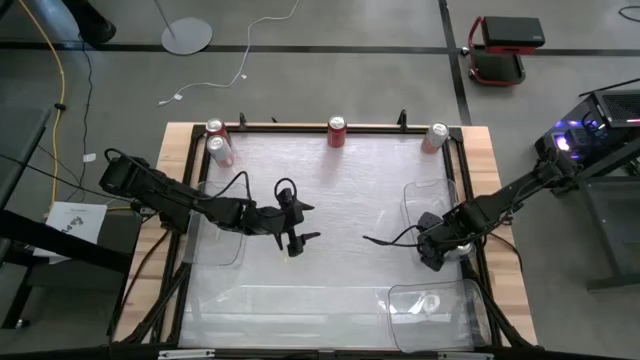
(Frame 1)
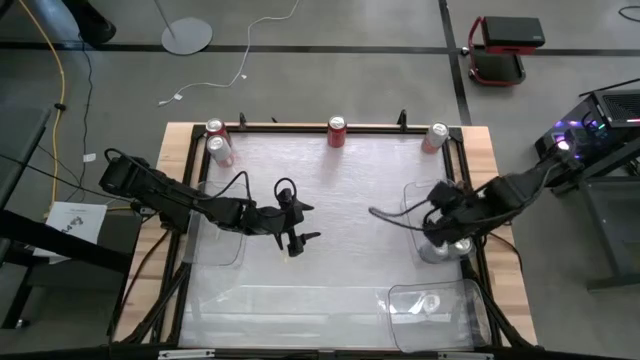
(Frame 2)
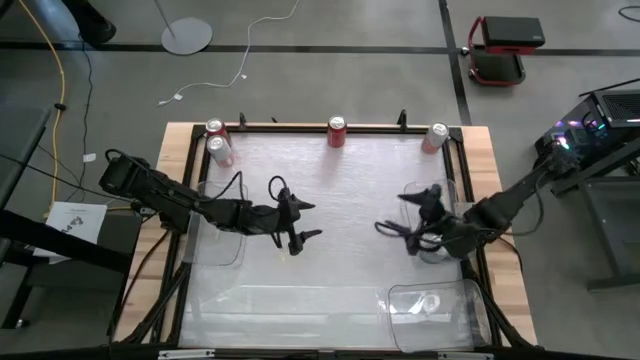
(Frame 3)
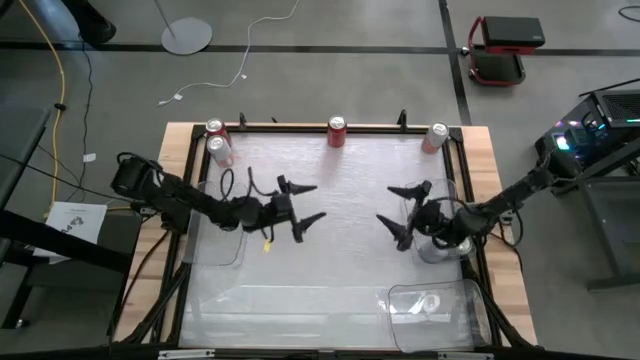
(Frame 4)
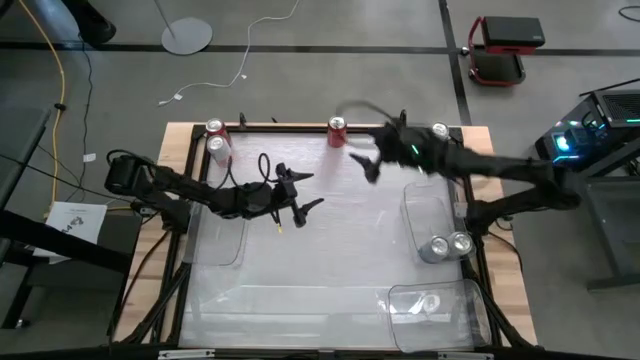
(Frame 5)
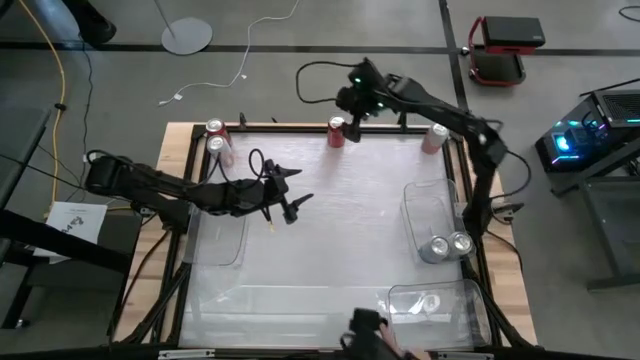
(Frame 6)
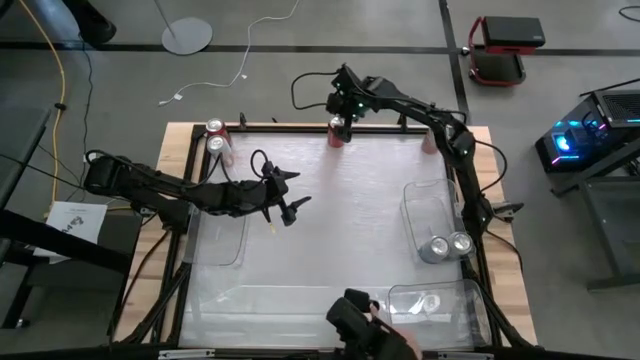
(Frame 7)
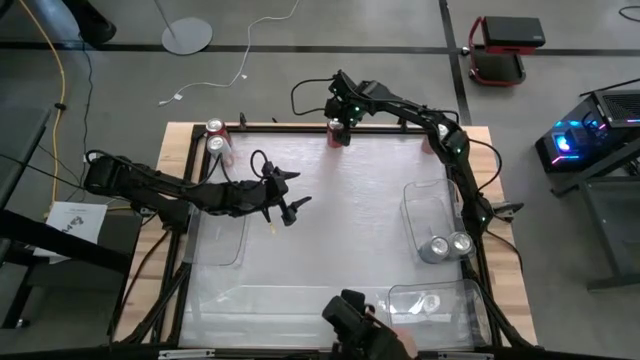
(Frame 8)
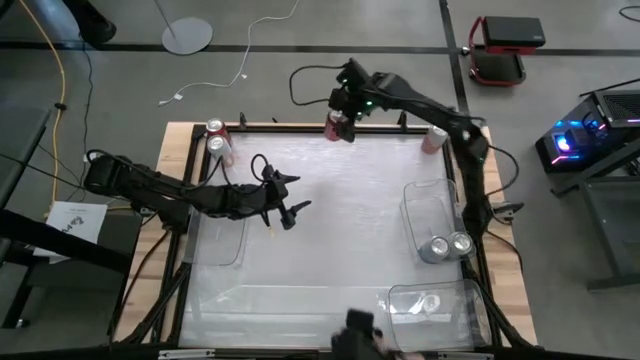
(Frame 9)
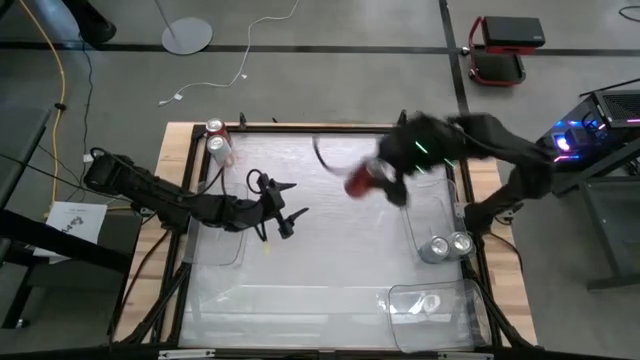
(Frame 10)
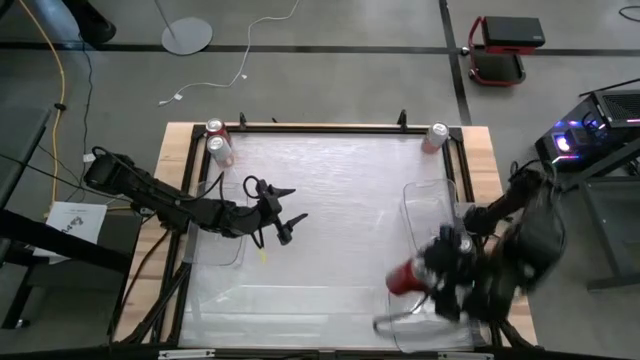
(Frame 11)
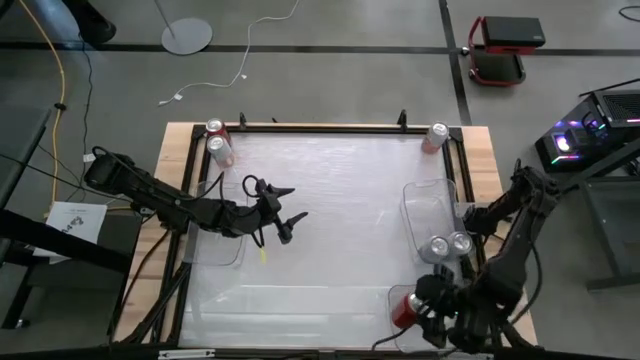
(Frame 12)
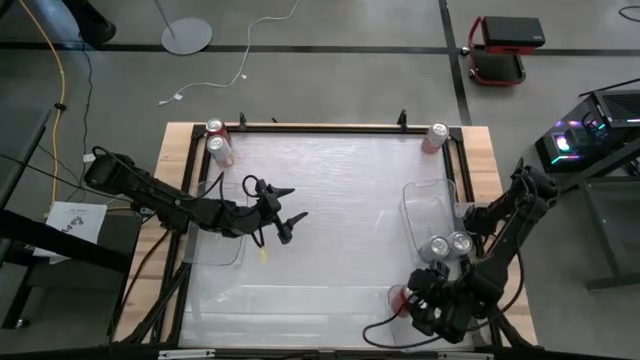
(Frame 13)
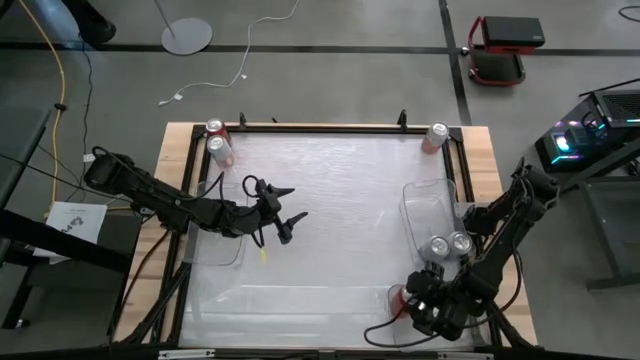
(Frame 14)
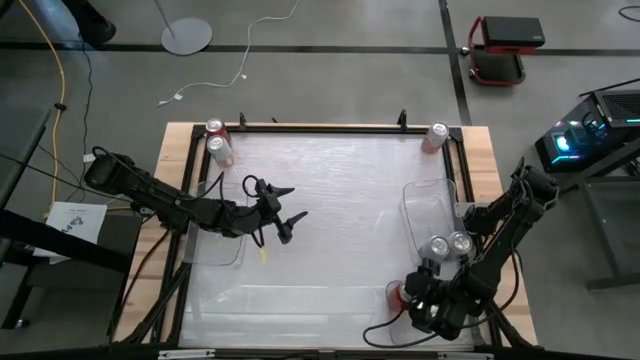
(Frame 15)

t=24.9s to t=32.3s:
Task: Sort soda cans
Put the right red-black soda can into the bottom transparent bin

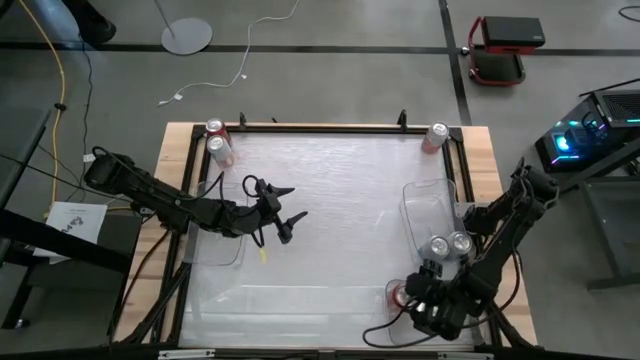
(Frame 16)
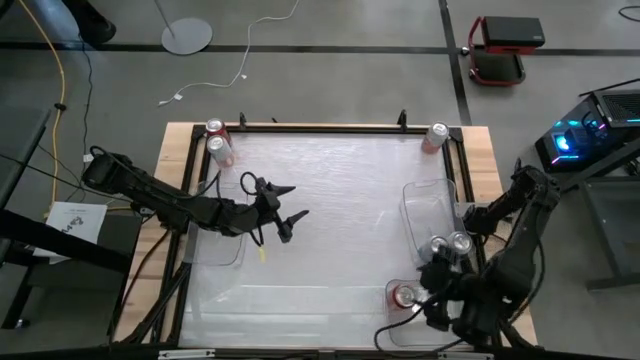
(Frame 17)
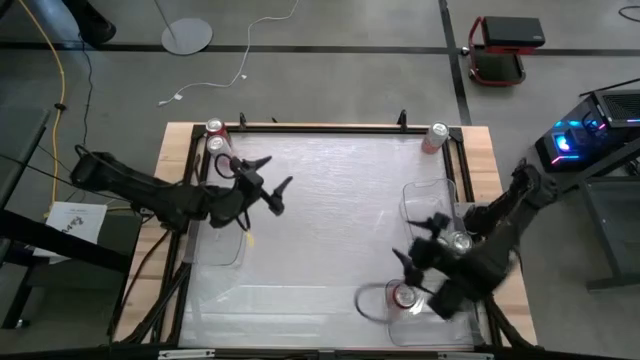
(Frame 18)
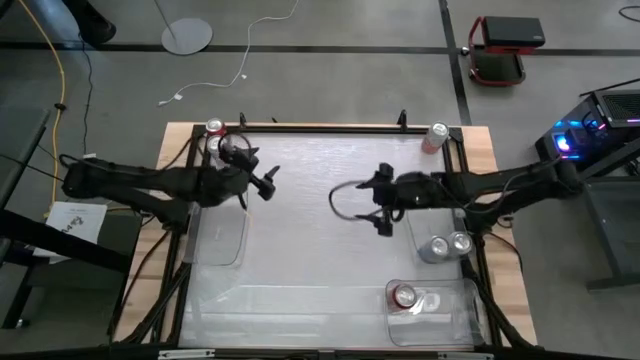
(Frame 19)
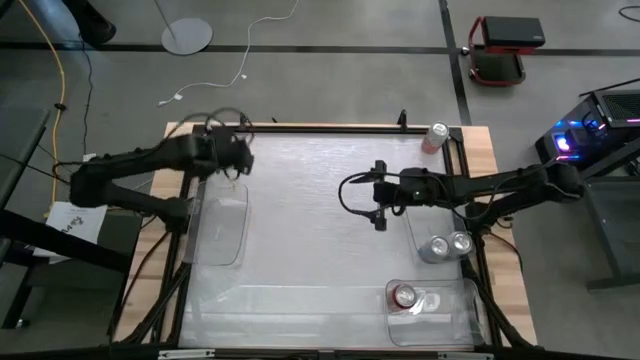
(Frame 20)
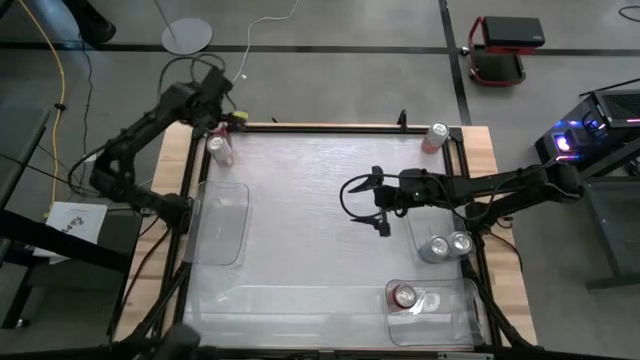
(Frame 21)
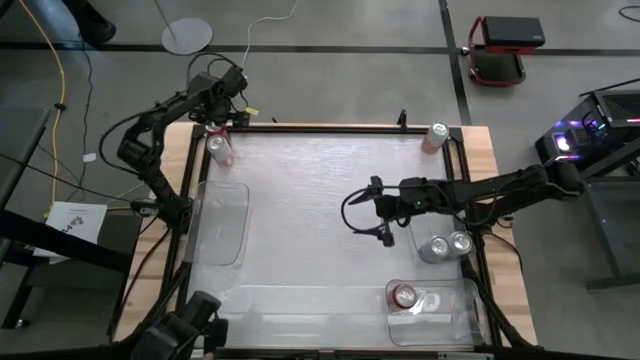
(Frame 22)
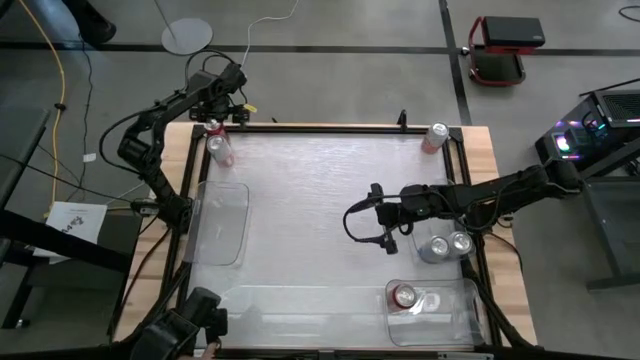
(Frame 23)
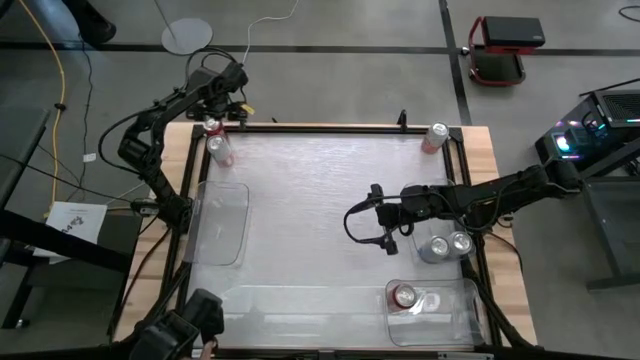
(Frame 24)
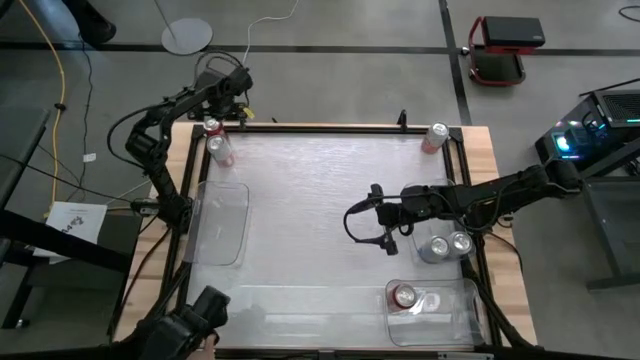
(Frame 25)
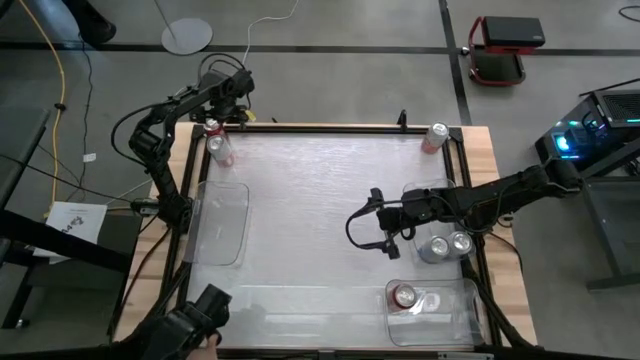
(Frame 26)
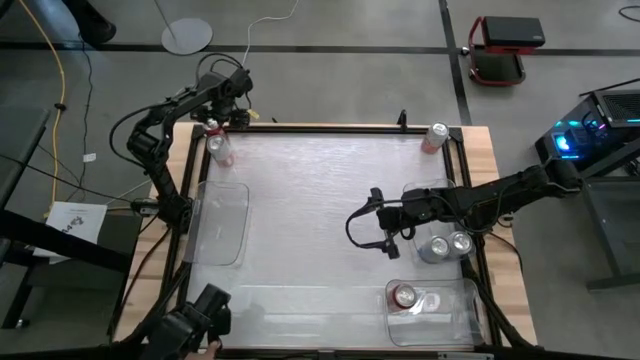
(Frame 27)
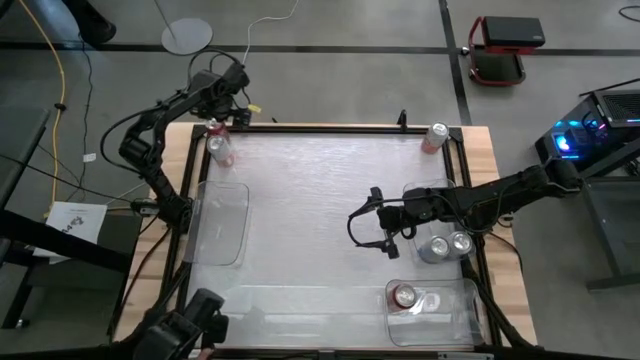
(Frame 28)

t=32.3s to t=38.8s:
Put the red-black soda can into the bottom transparent bin

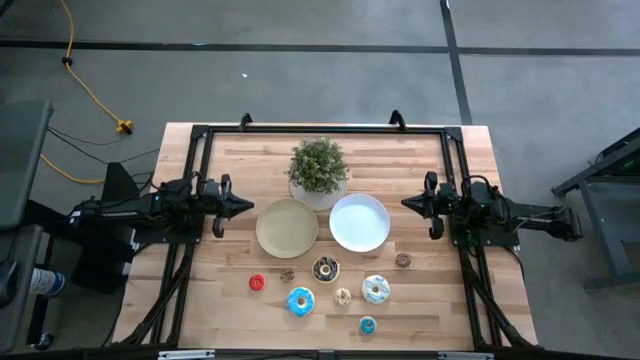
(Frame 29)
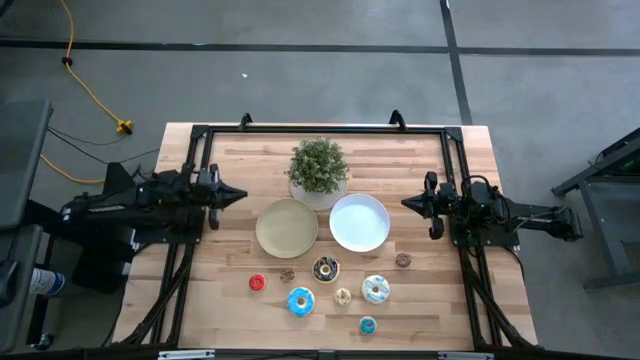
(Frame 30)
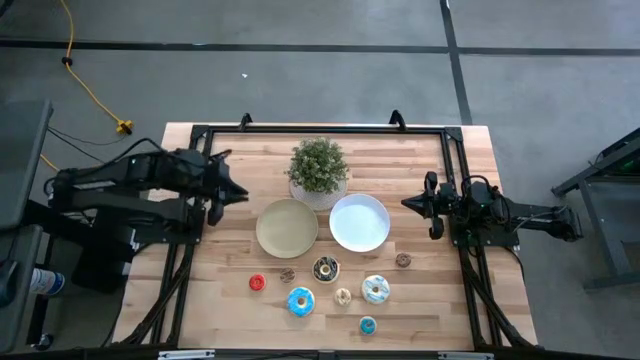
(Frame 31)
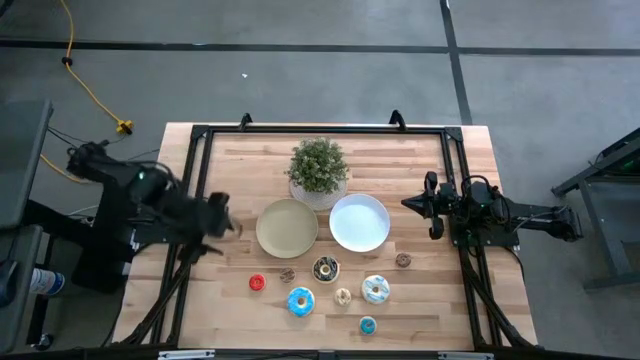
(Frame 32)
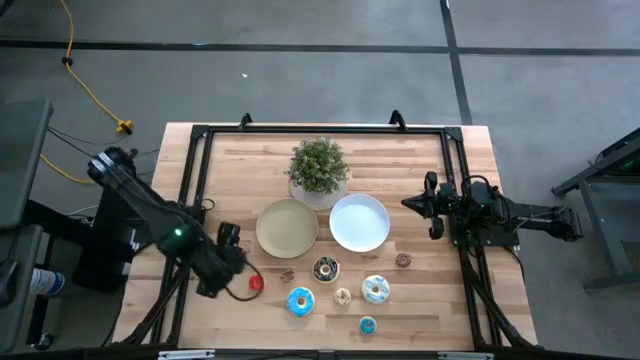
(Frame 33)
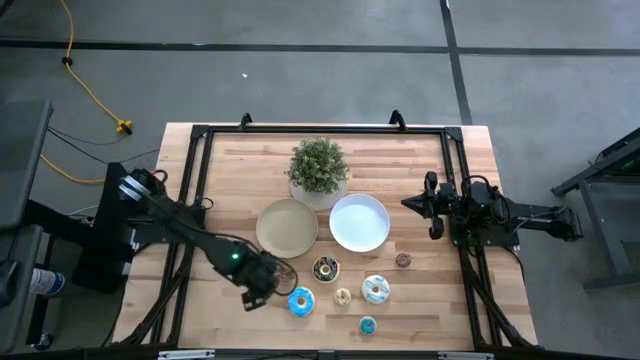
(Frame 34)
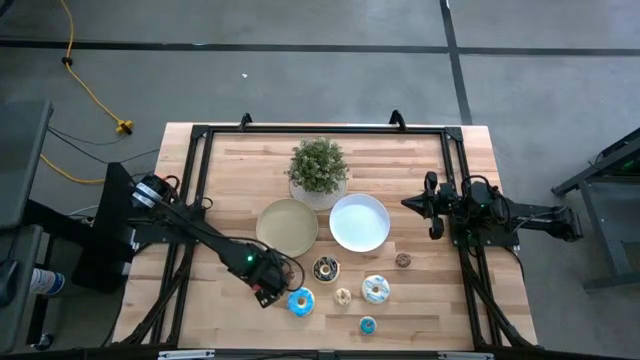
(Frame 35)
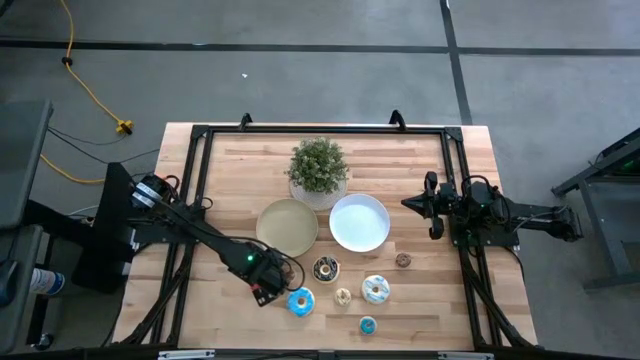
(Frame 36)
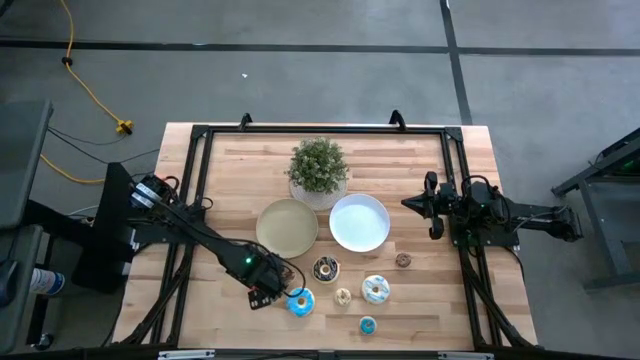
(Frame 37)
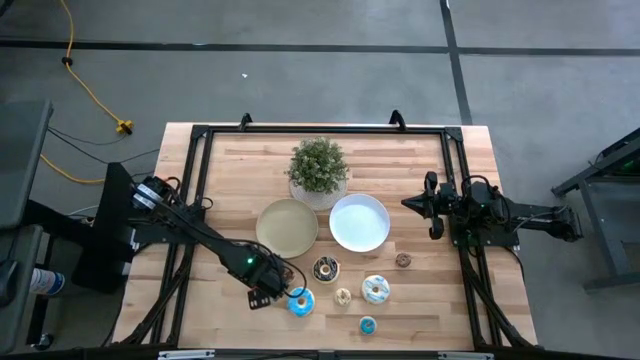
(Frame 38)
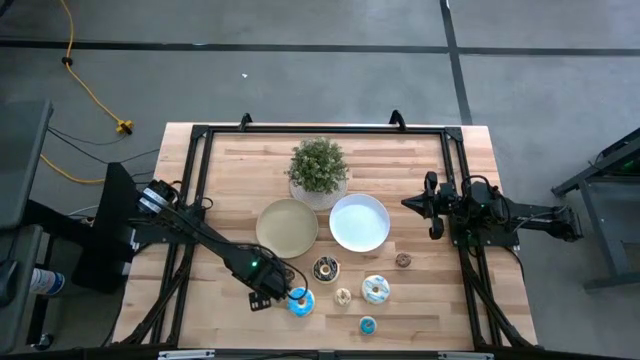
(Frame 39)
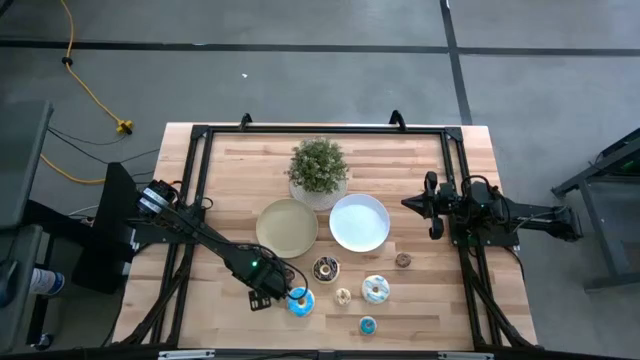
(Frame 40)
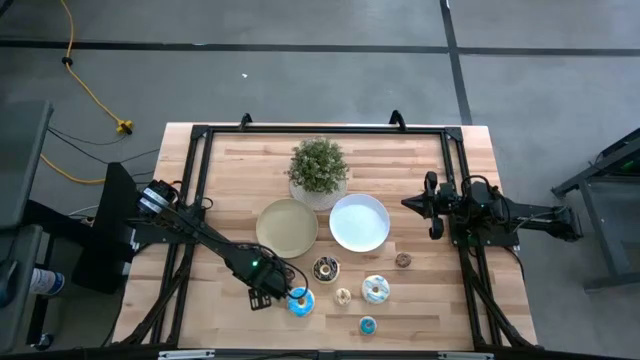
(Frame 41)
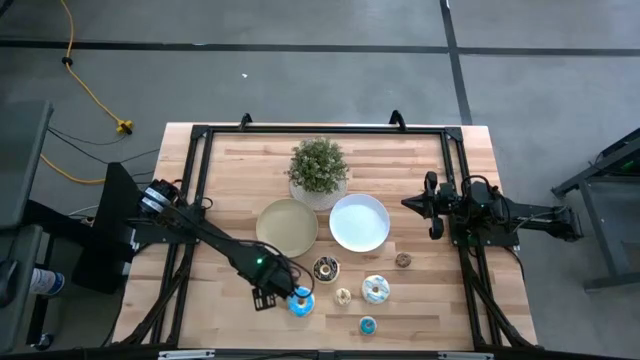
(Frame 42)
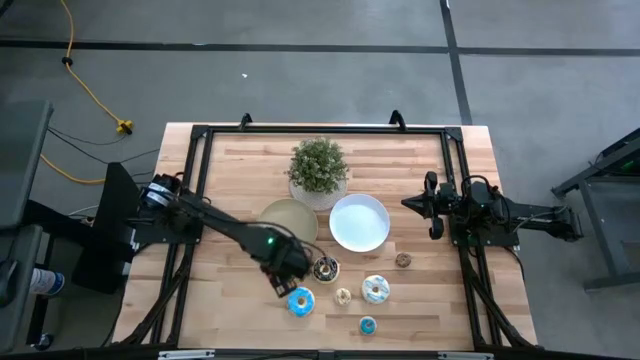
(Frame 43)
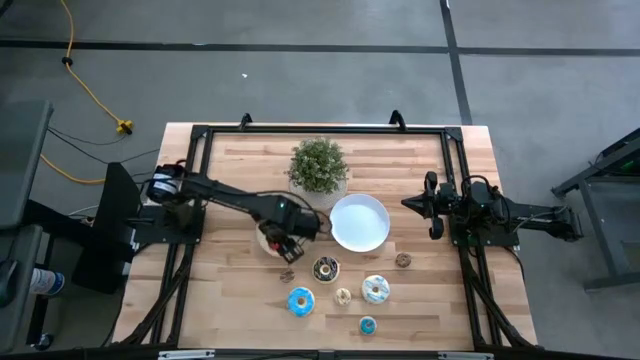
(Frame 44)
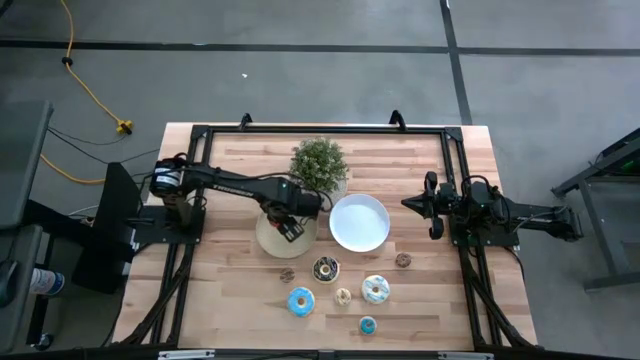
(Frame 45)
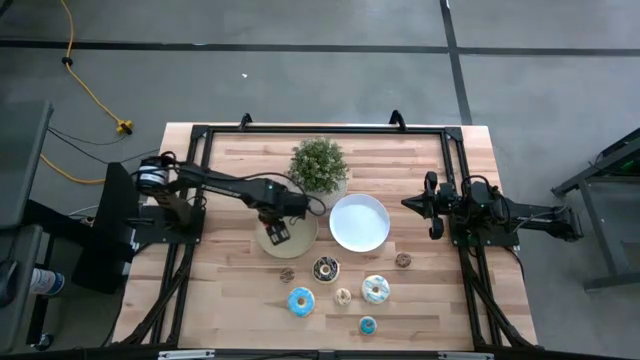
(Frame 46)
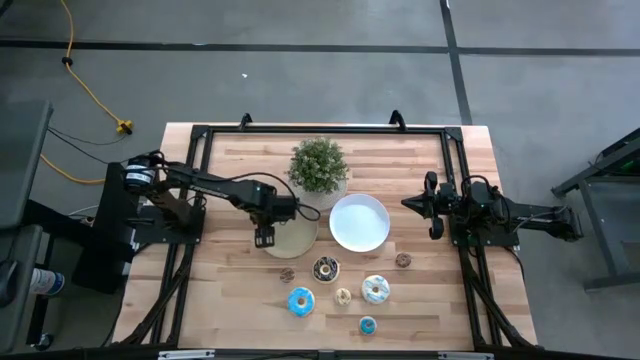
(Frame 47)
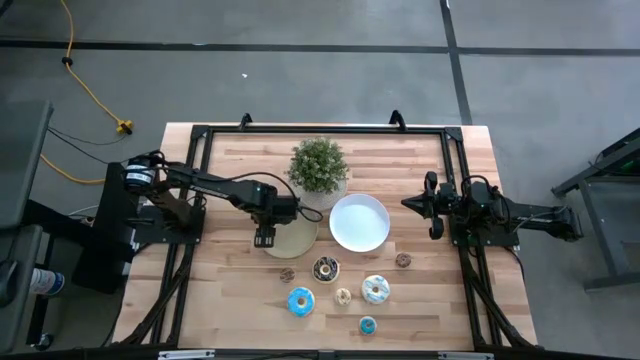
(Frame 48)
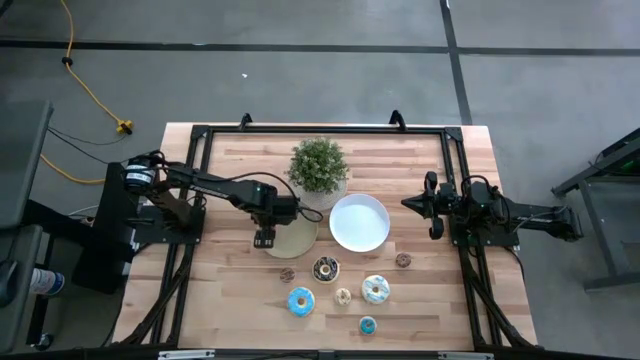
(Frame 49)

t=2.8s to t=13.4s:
Task: Pick & Place donuts
Put the small orange donut on the brown plate
